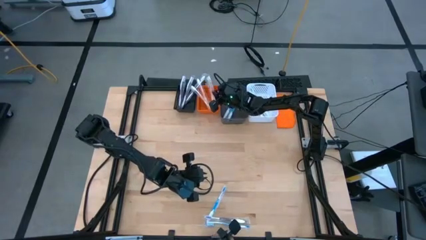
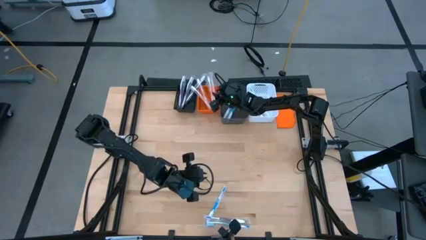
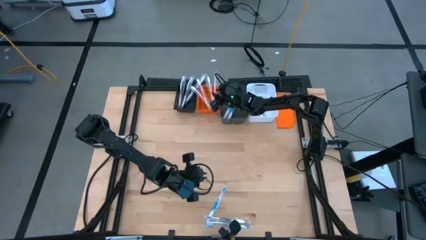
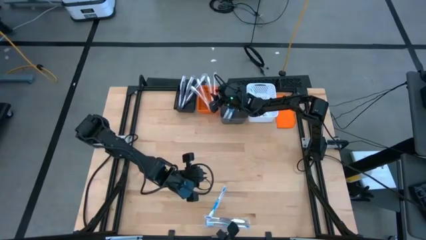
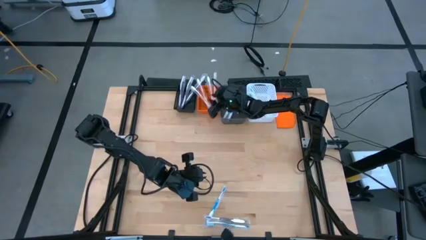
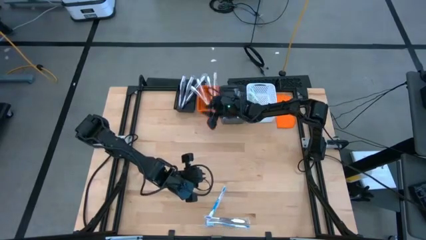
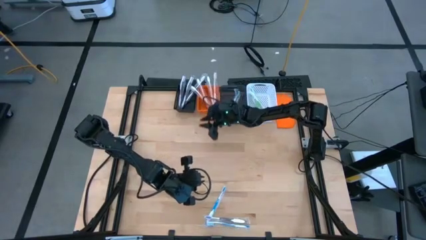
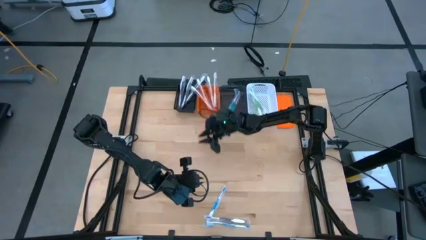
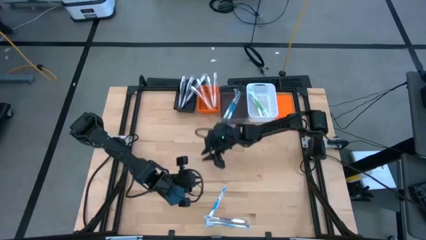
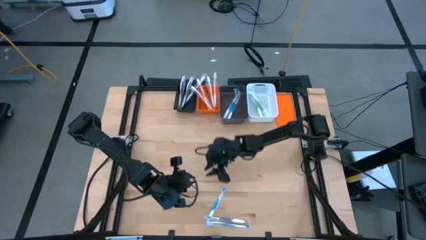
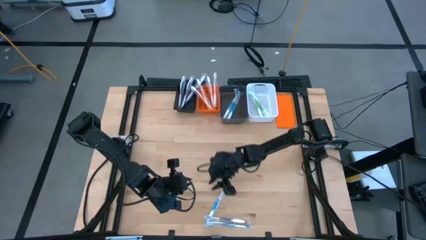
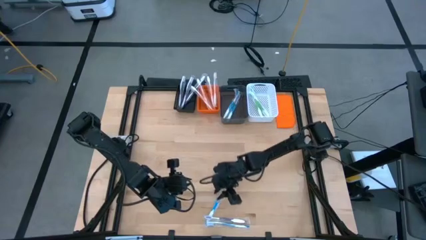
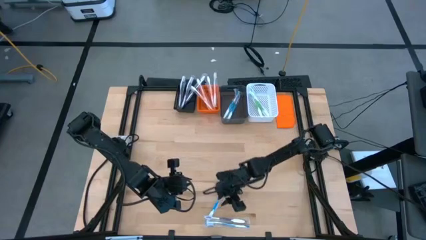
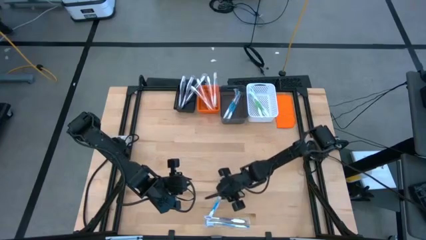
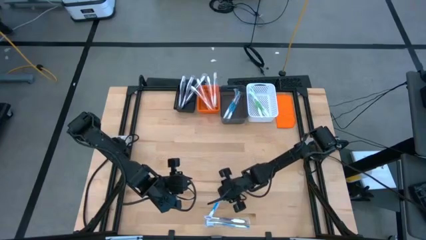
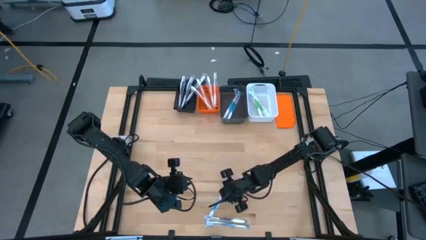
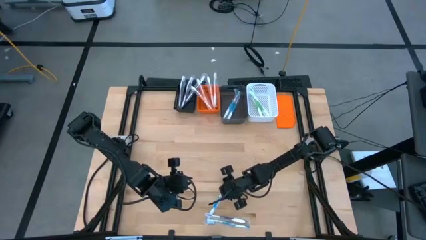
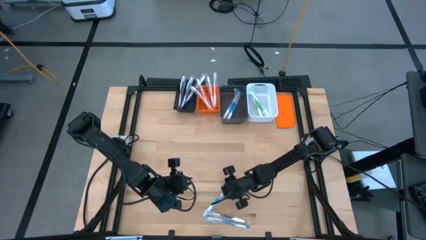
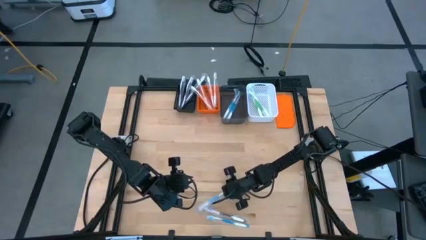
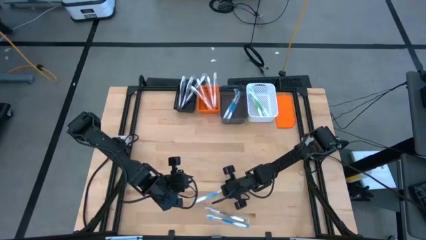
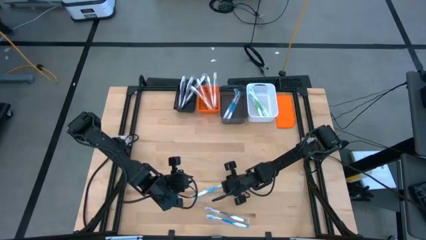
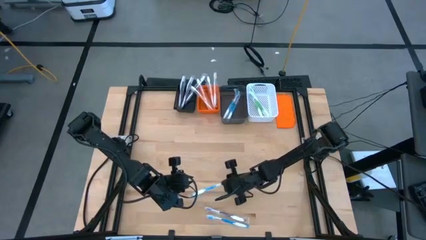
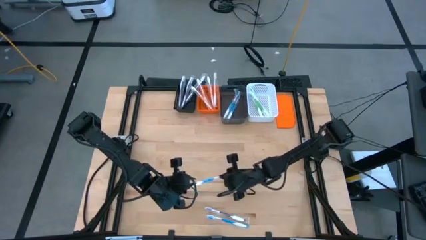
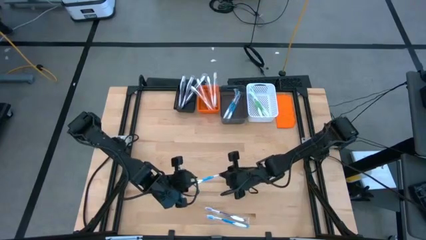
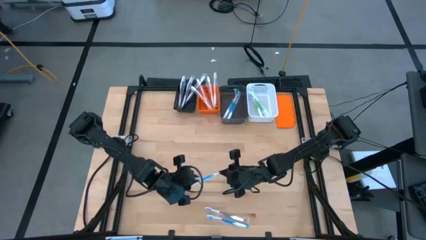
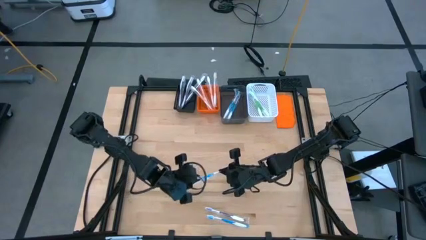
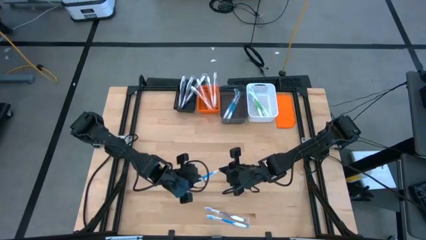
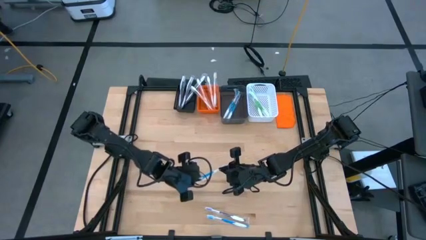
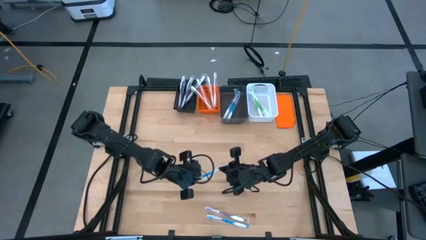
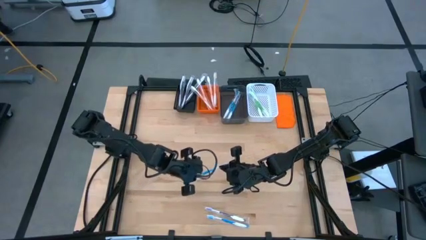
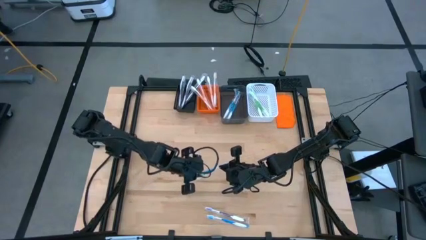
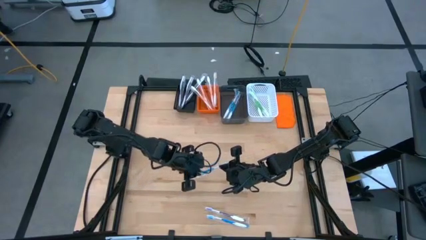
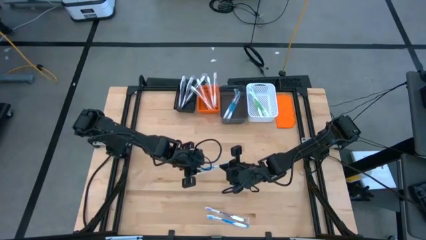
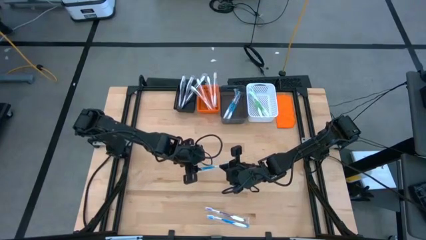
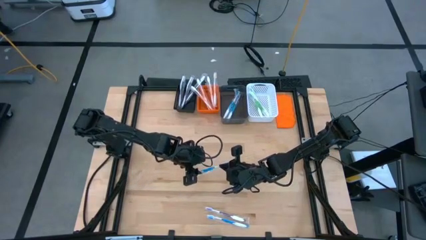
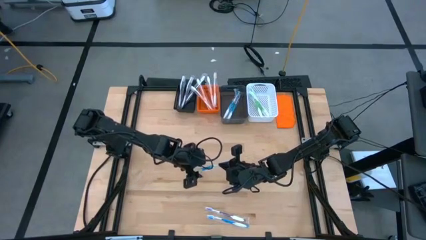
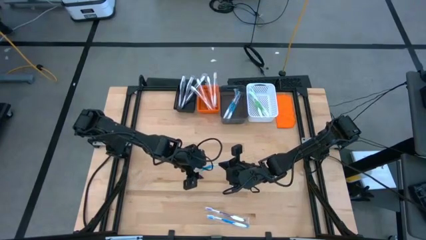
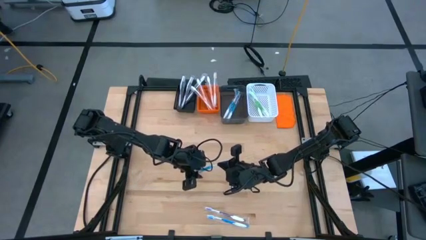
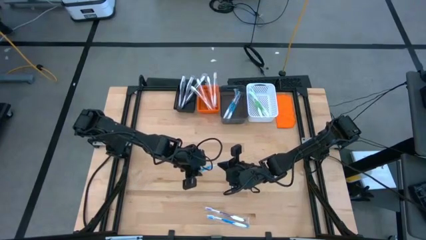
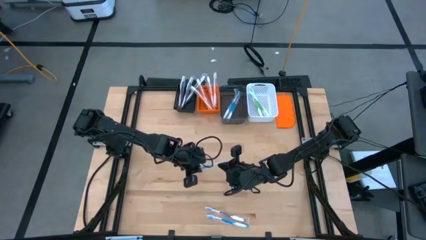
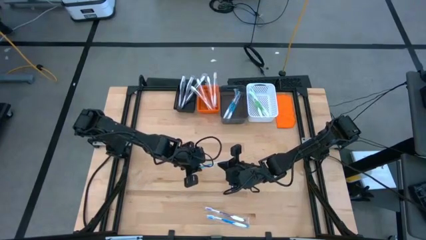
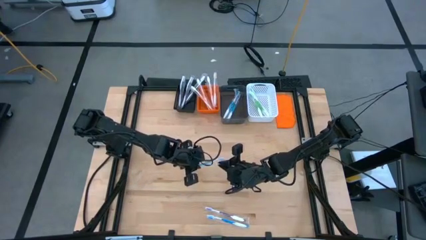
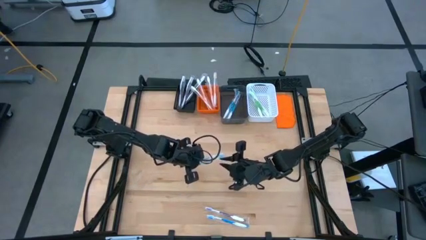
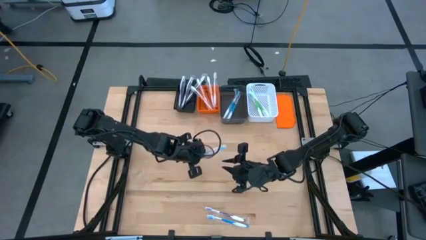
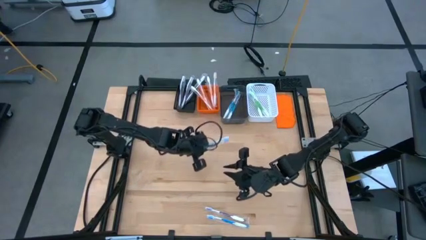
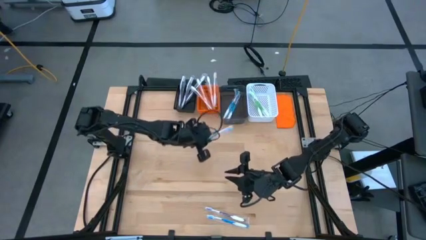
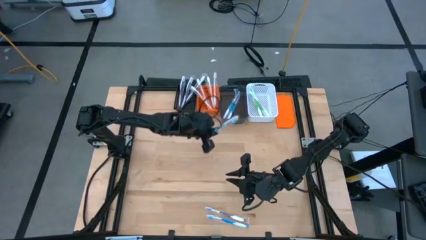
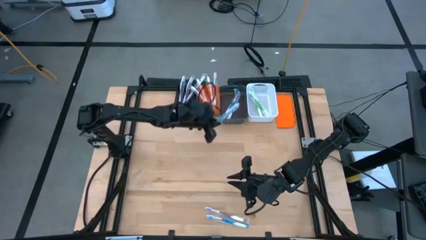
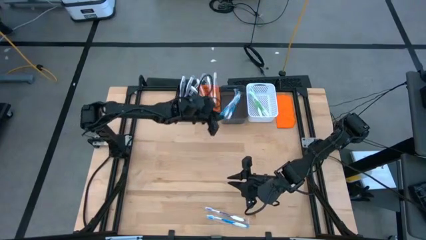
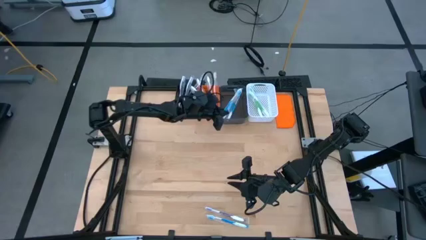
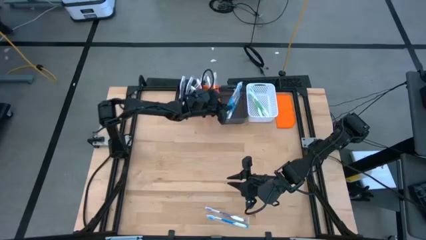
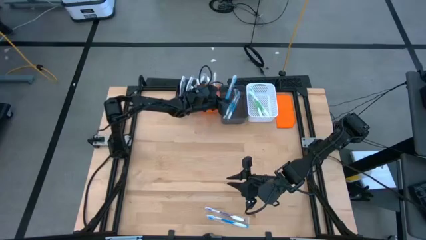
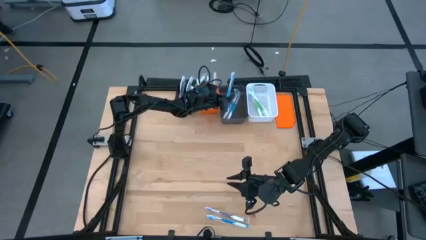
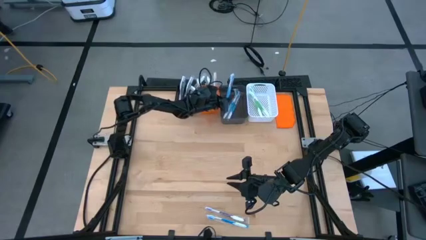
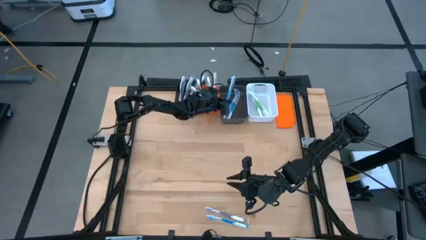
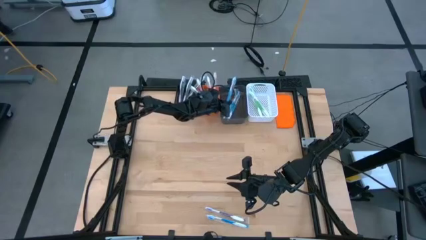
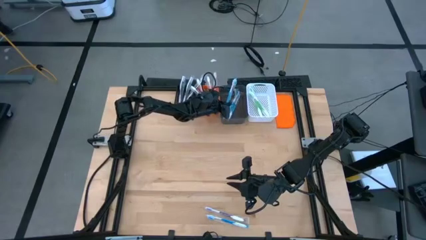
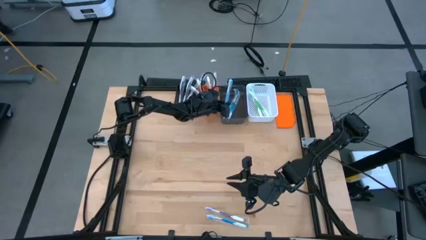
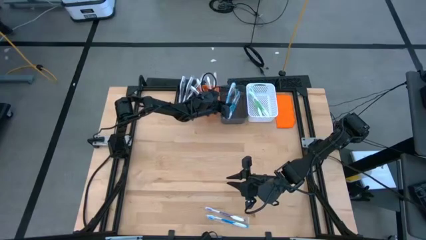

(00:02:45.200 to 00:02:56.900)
Task: Pick & Place Toothbrushes
Put the blue toothbrush into the black transparent bin

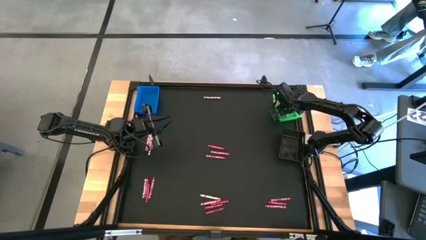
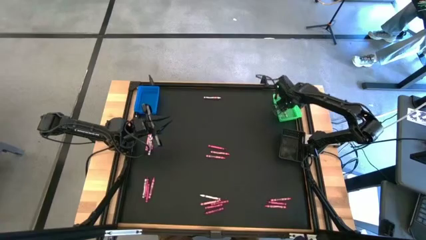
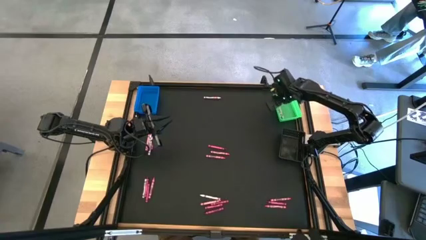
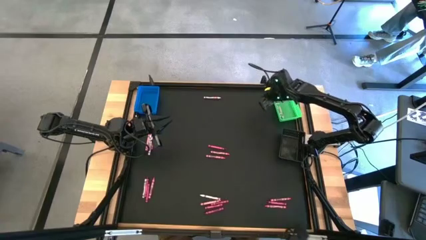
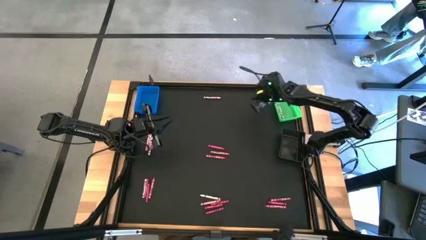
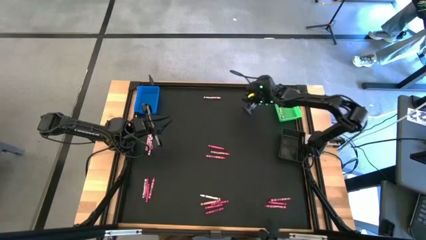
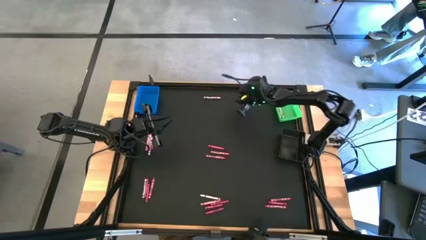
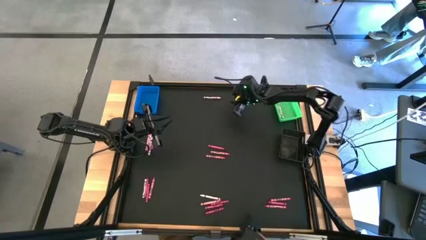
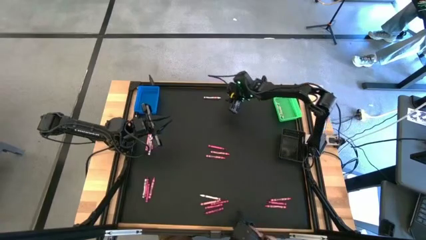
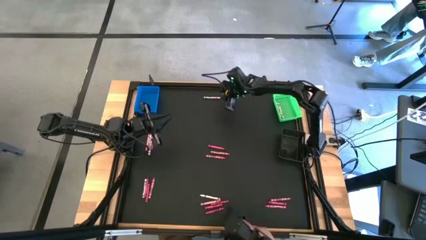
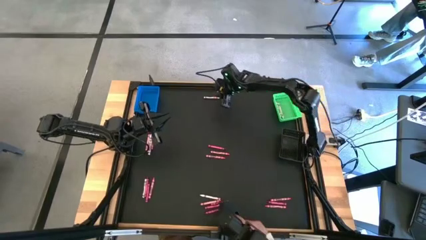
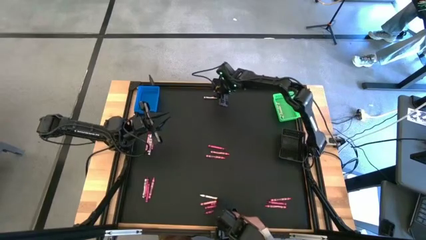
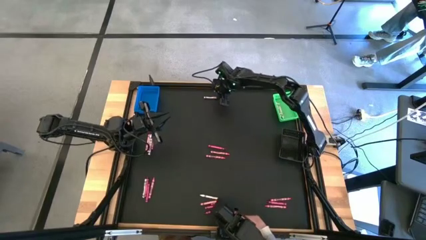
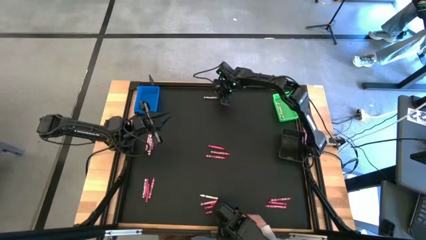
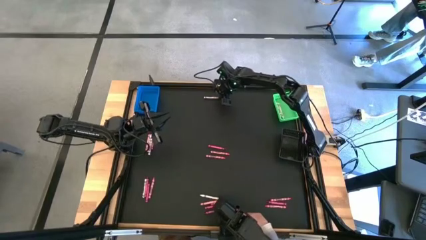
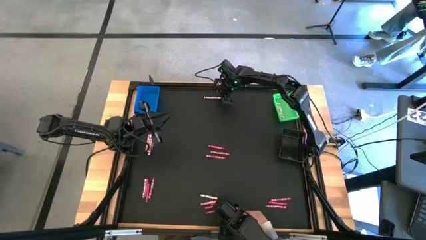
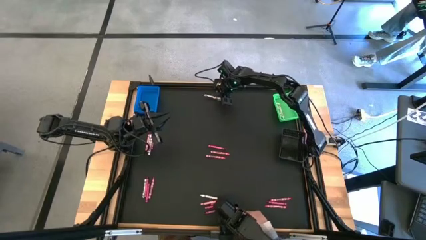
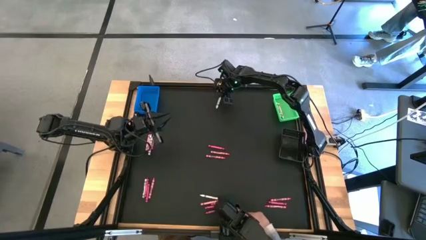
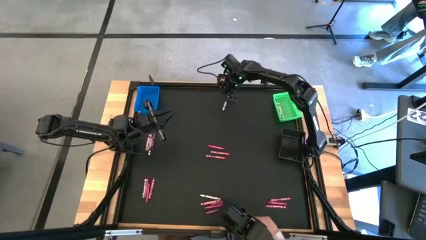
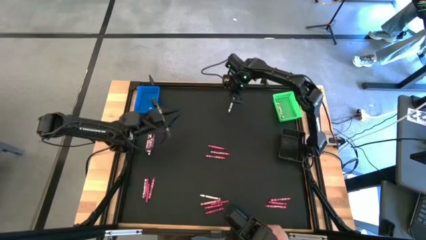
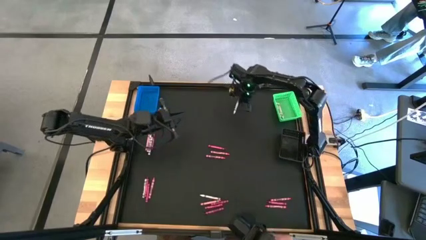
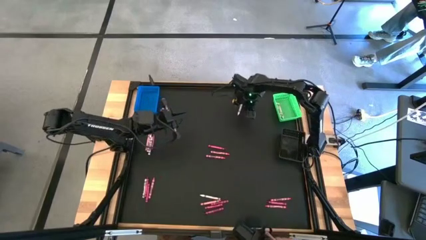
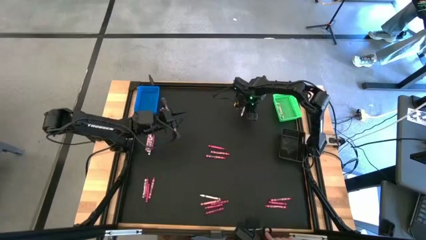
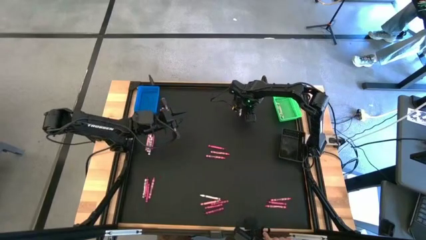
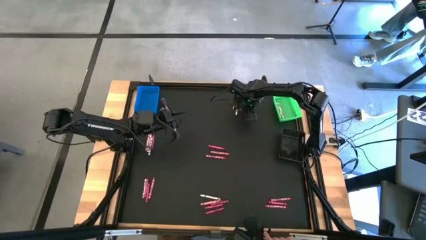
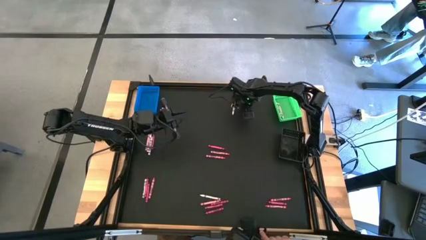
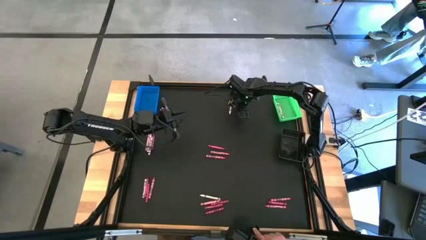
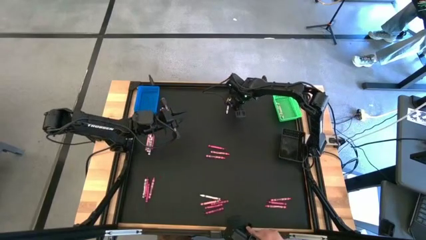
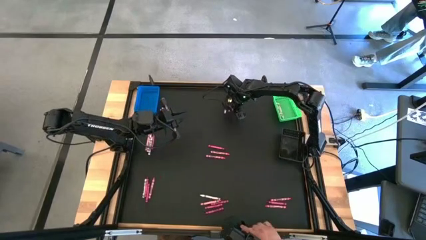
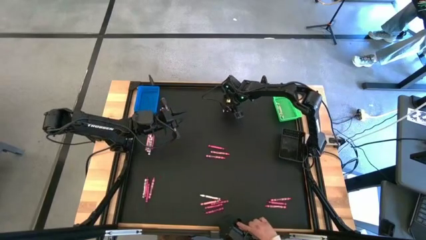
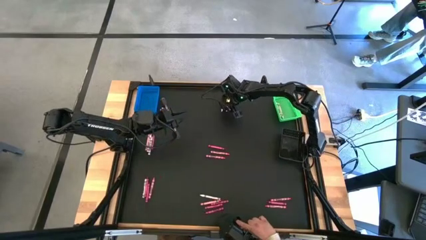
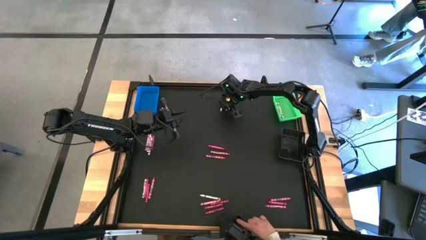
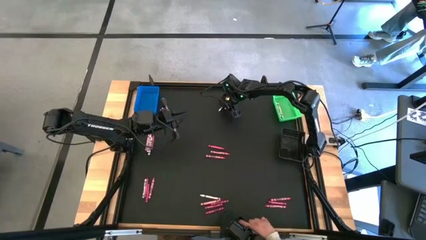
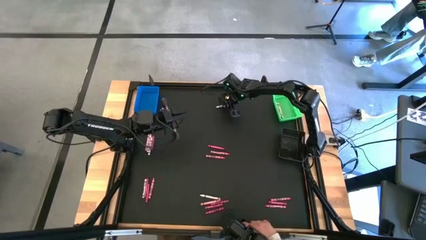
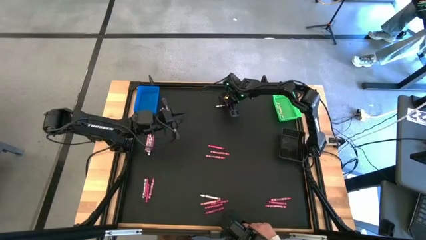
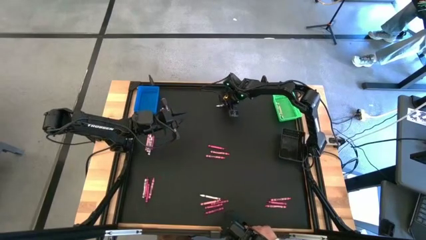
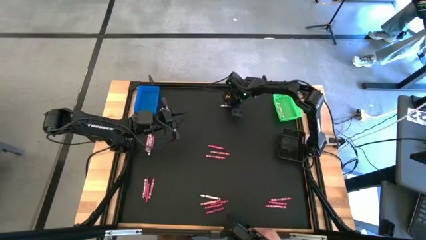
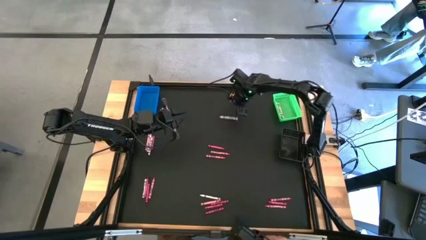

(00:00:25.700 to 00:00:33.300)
Task: Sort crayons
Put the white crayon into the green bin
